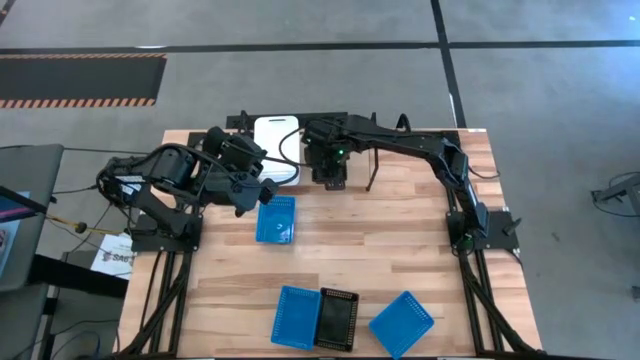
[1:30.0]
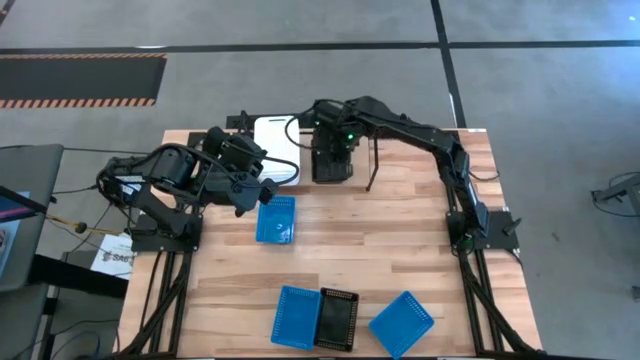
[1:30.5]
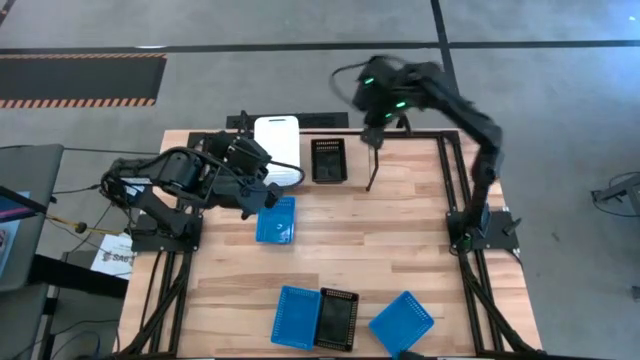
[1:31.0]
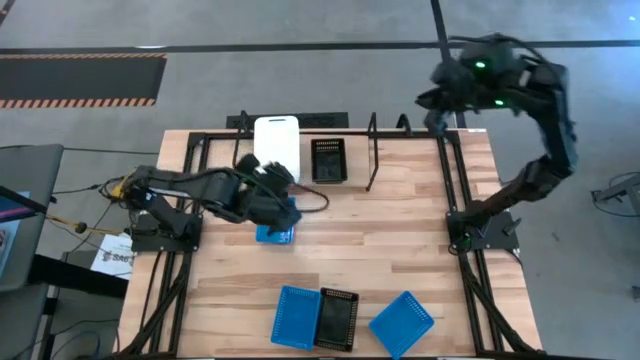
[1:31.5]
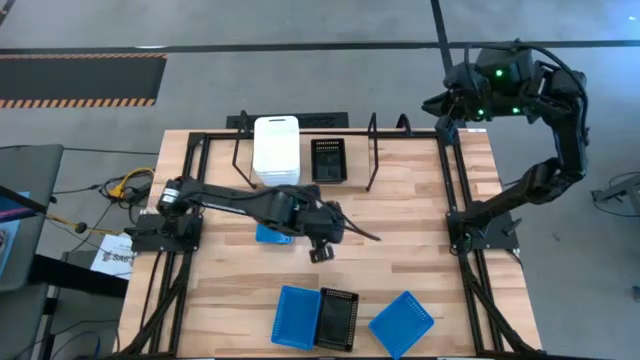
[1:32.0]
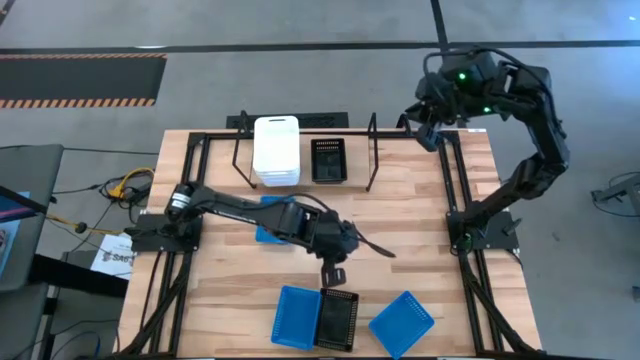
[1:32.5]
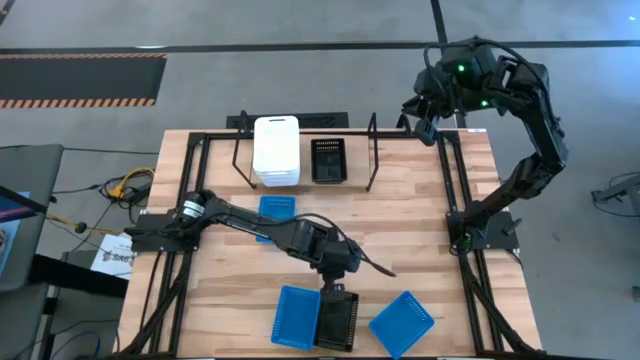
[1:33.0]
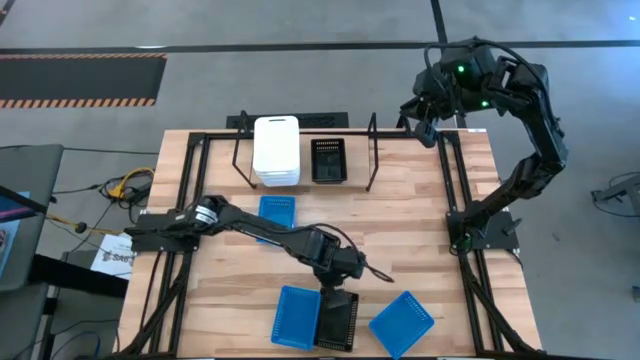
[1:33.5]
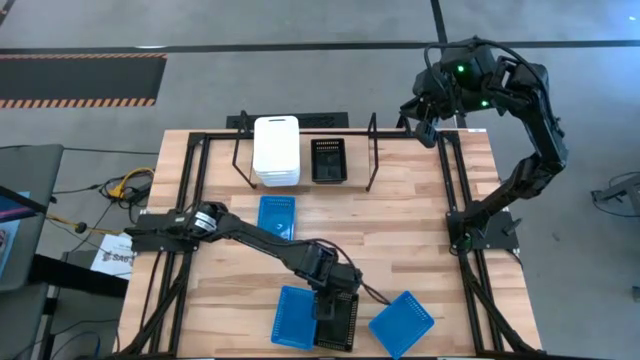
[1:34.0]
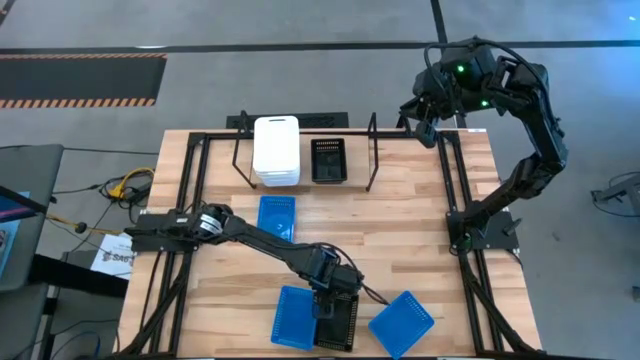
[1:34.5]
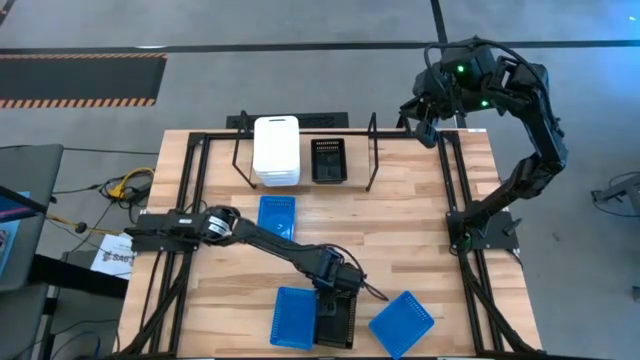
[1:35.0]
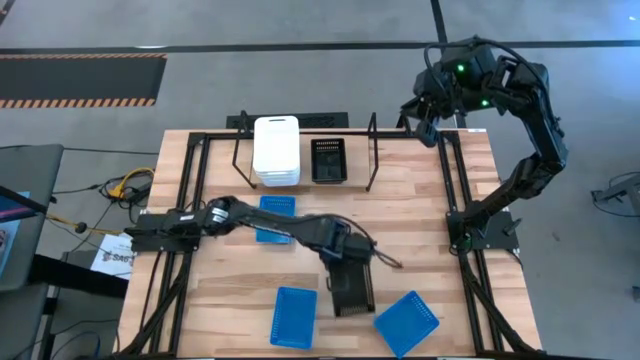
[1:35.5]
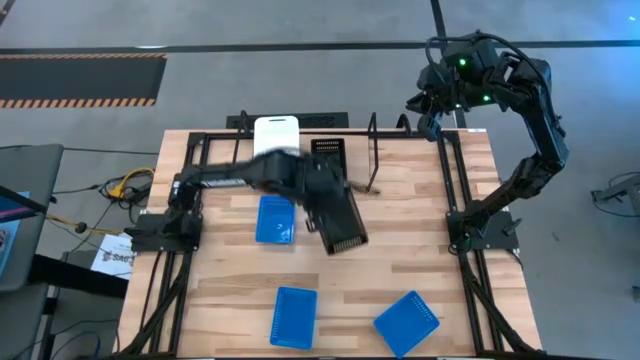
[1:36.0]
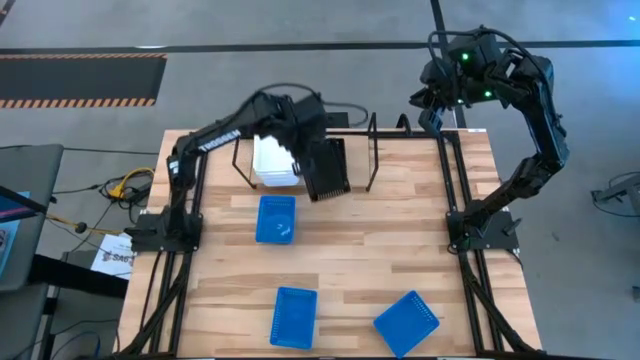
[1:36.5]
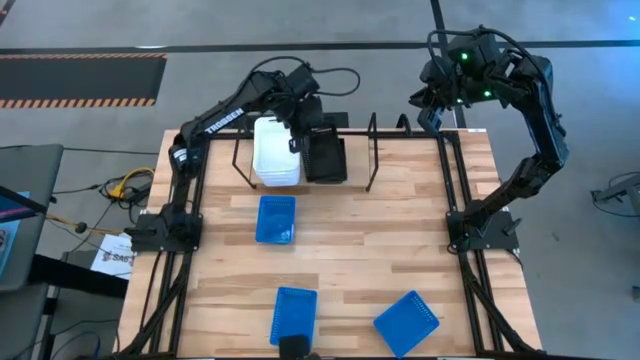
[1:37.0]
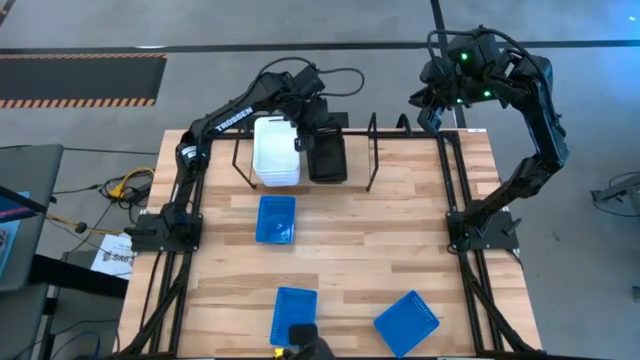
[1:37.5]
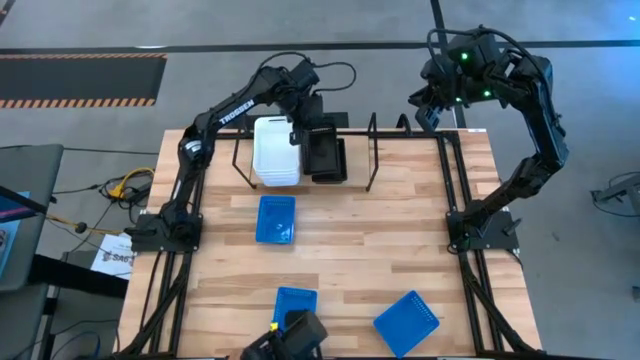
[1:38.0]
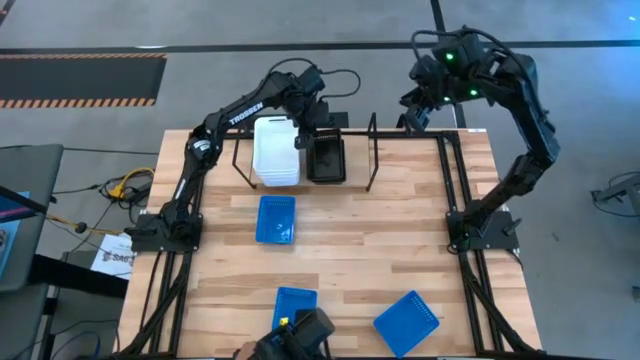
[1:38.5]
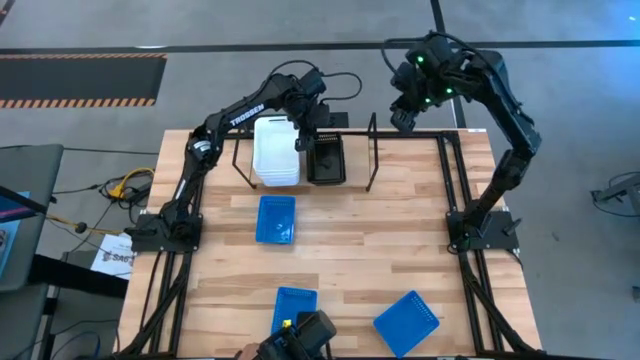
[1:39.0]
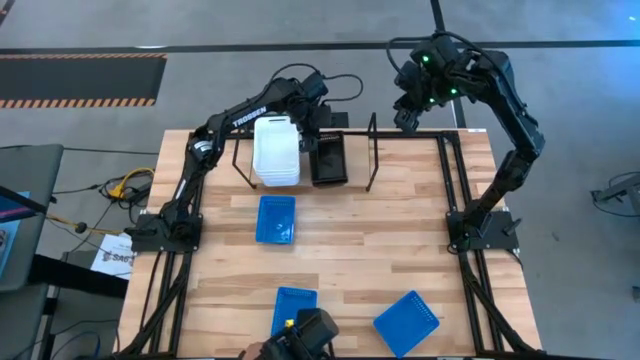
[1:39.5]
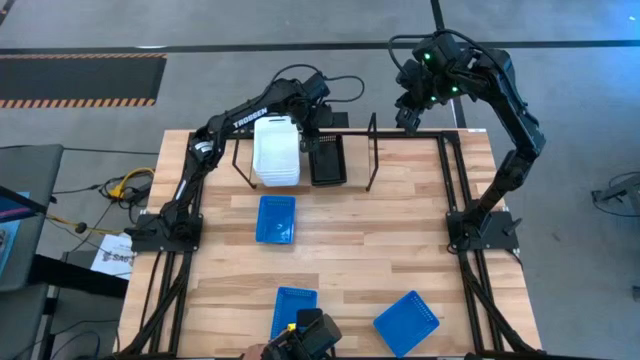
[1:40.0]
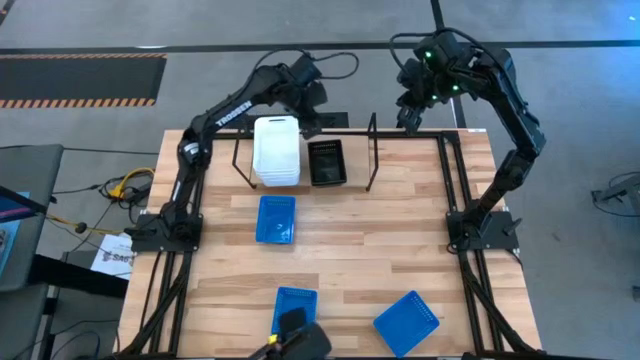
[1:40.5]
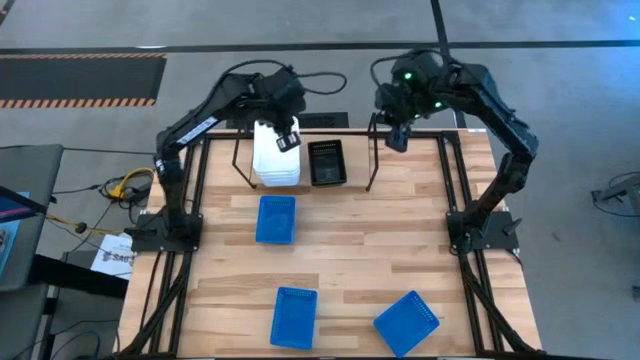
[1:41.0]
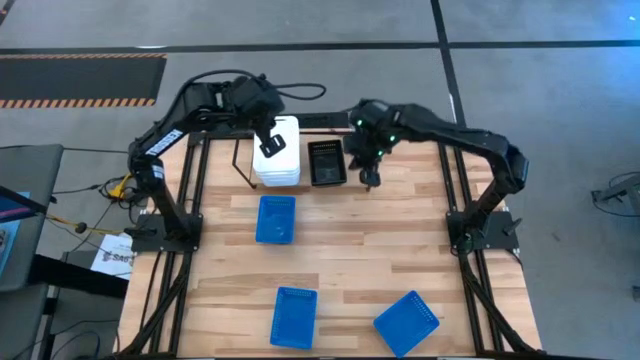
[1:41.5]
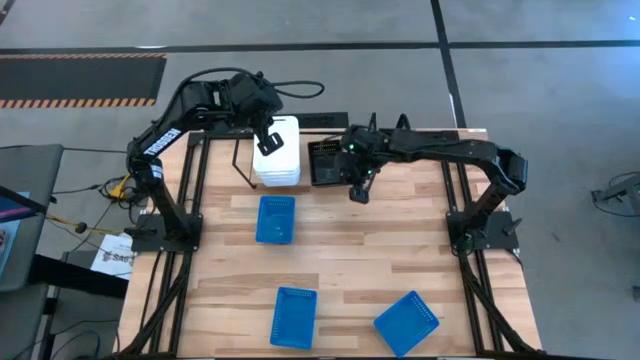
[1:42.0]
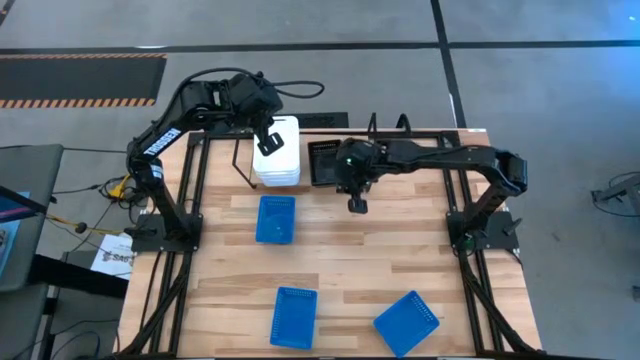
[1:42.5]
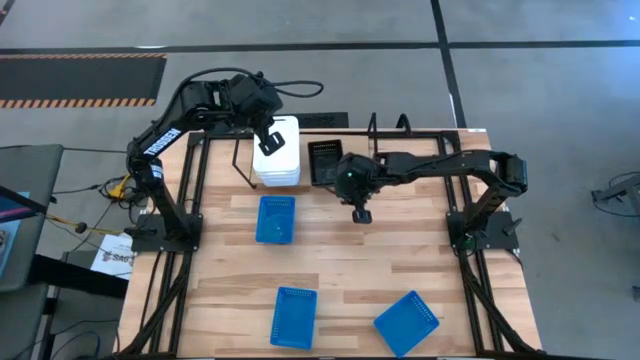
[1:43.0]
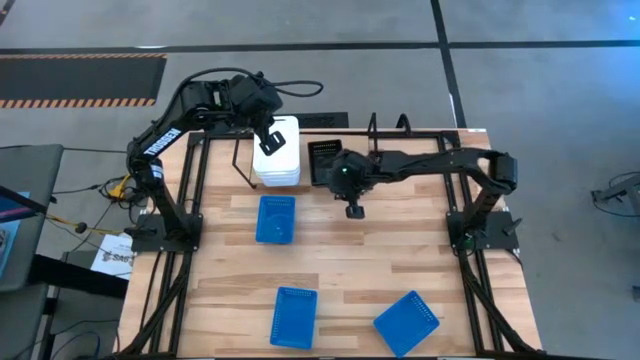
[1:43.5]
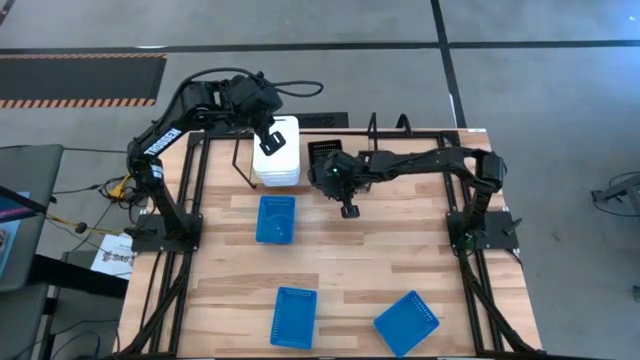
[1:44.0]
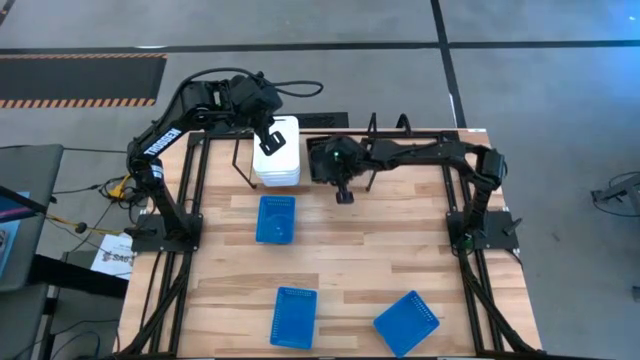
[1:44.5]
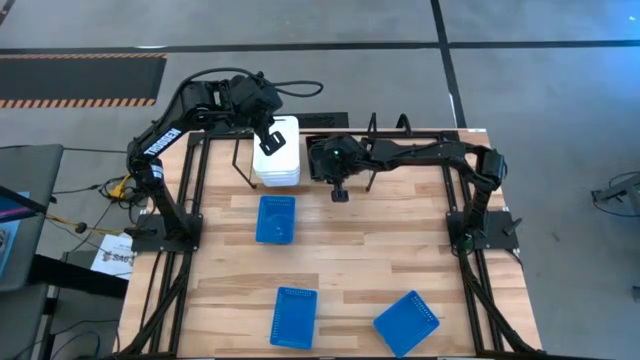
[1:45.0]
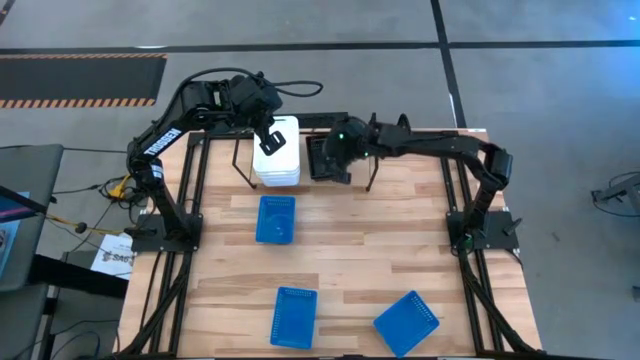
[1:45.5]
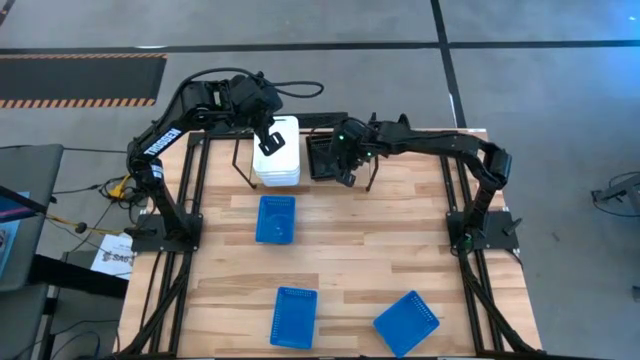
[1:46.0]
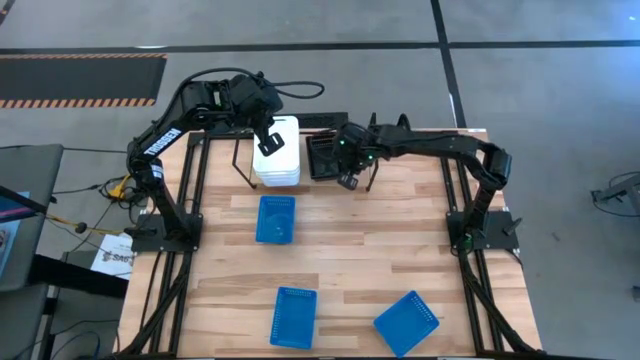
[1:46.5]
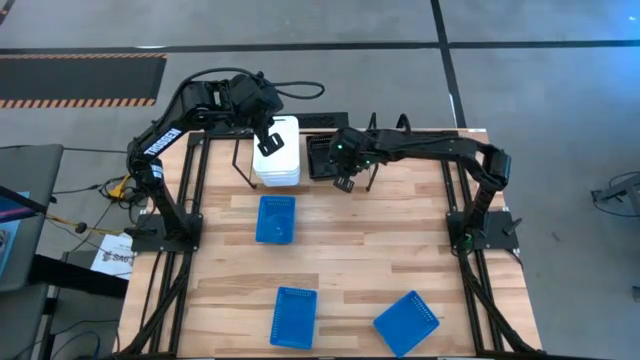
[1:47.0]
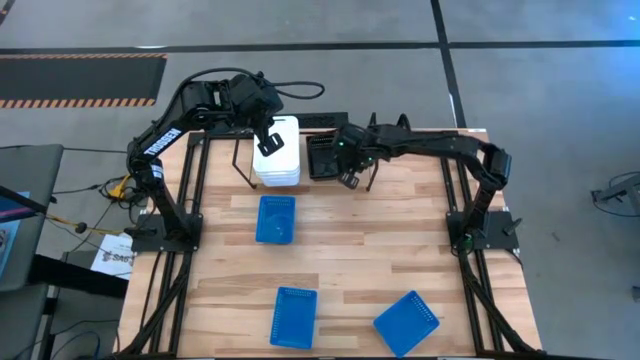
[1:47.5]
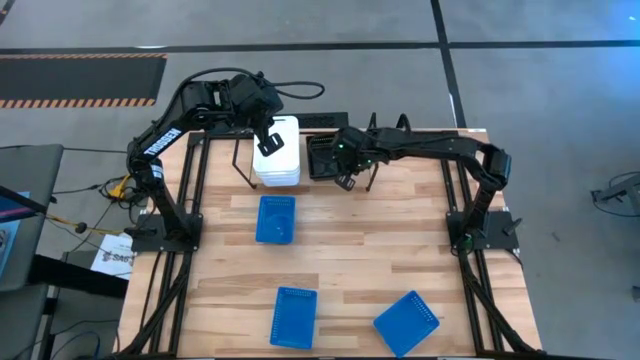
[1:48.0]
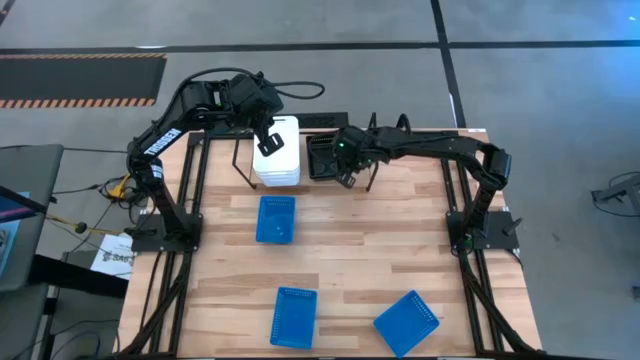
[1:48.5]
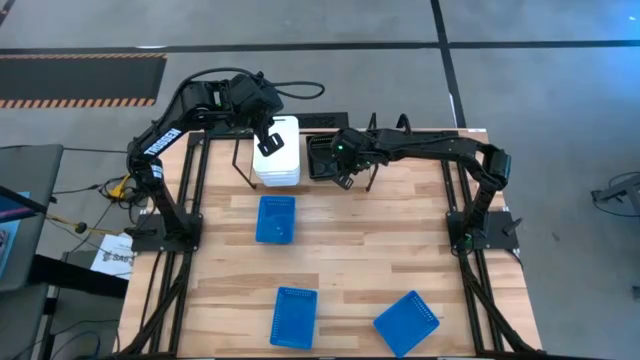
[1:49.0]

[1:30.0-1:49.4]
Task: Stack baskets on shelf by color
Stack the black bin on top of the black bin on the shelf

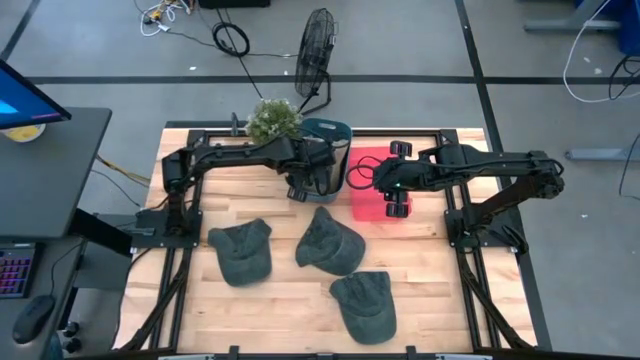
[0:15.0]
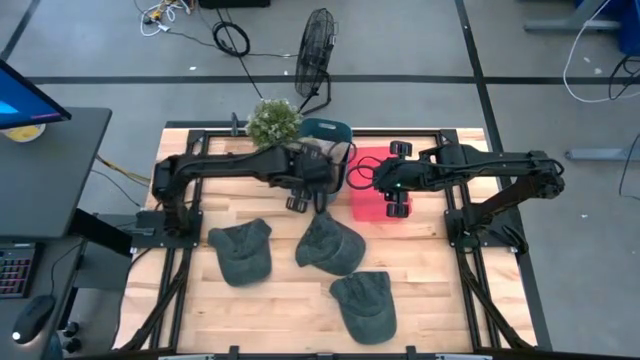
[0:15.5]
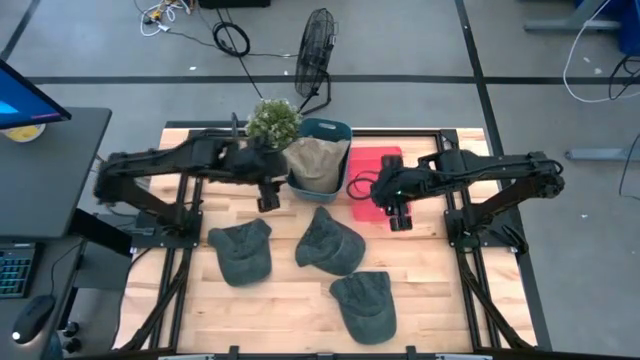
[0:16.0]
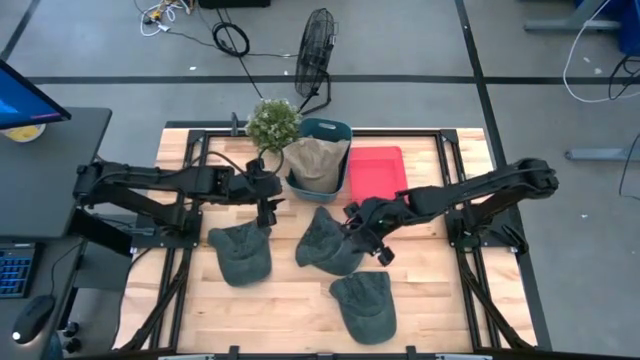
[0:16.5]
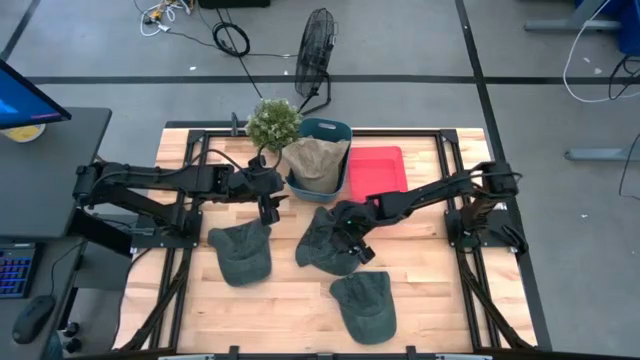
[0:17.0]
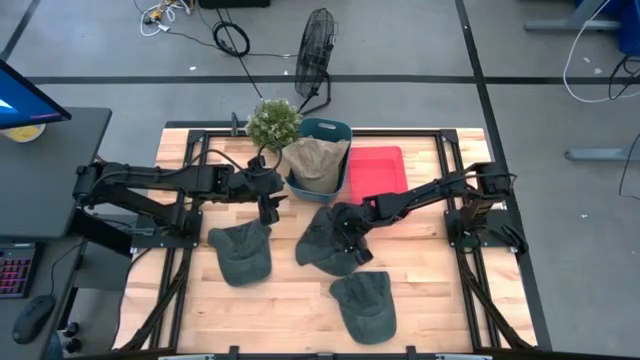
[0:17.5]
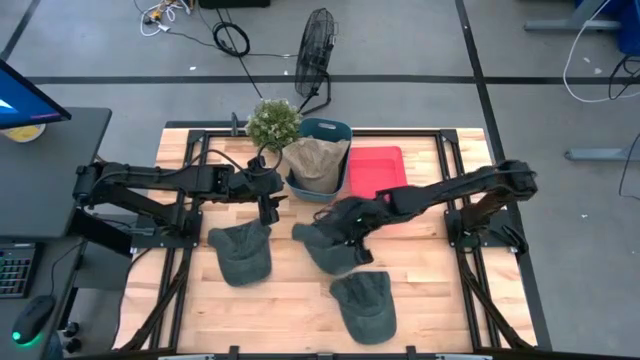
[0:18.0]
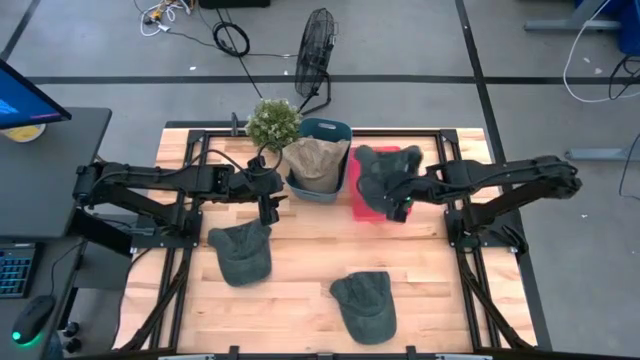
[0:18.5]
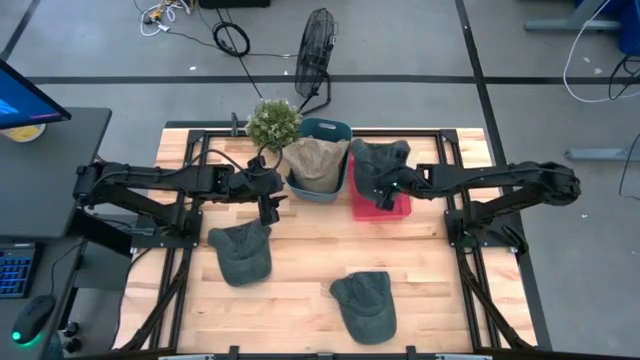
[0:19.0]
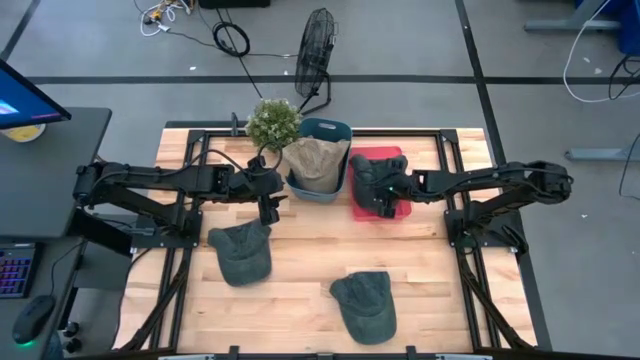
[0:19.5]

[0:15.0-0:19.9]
Task: Pick & Place hat
Put the top right gray cap into the red bin
